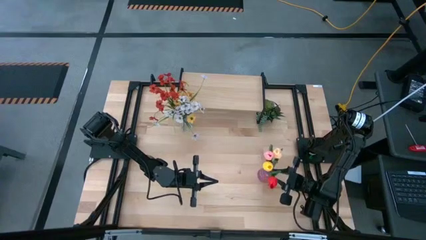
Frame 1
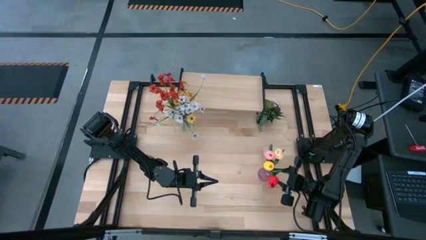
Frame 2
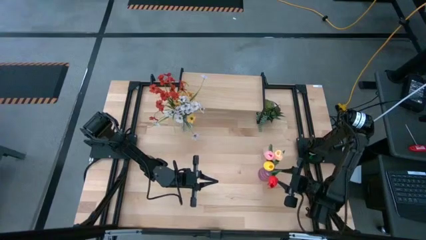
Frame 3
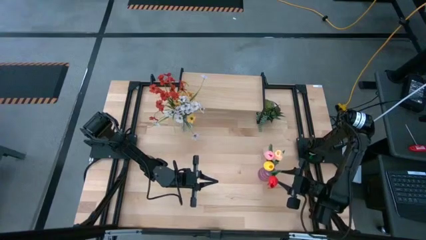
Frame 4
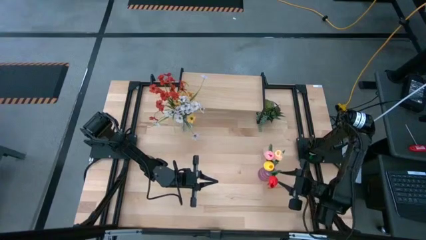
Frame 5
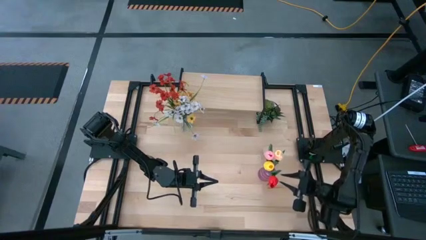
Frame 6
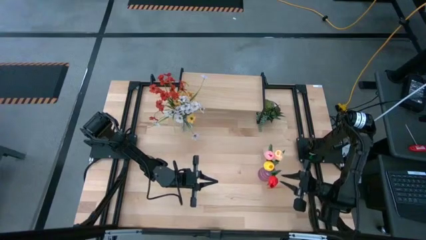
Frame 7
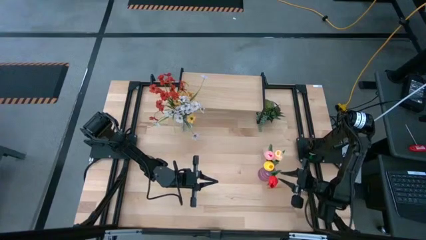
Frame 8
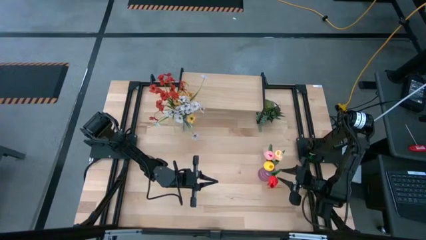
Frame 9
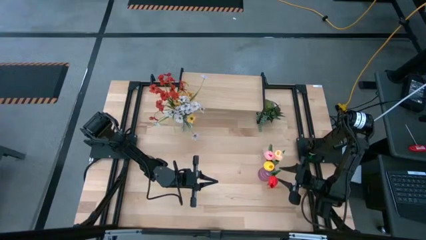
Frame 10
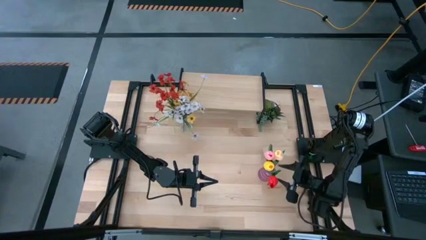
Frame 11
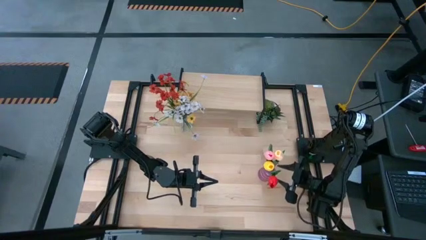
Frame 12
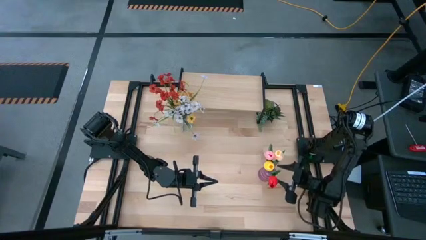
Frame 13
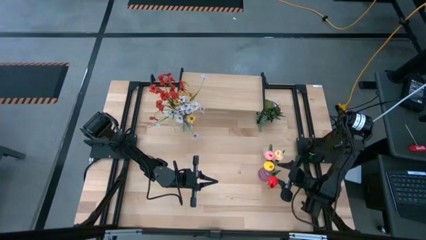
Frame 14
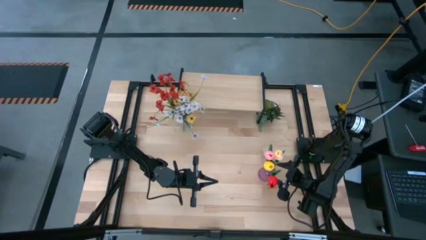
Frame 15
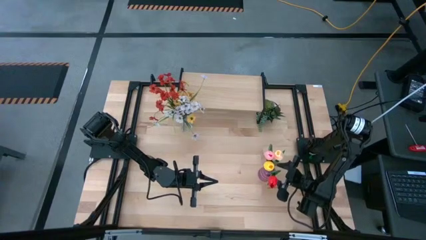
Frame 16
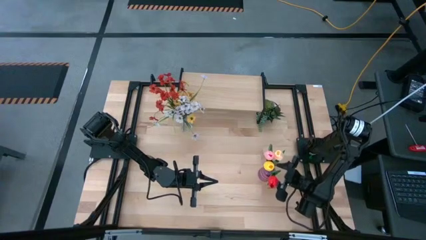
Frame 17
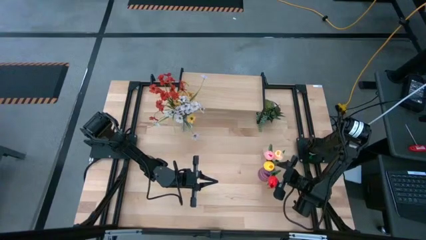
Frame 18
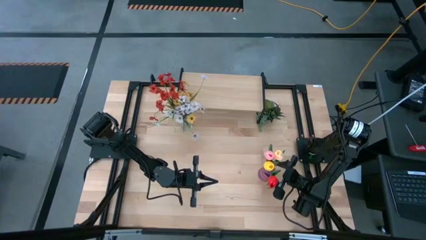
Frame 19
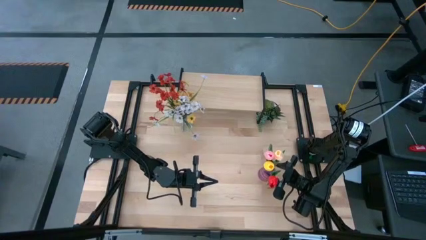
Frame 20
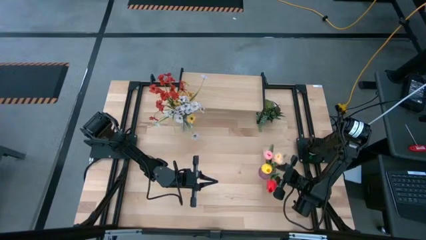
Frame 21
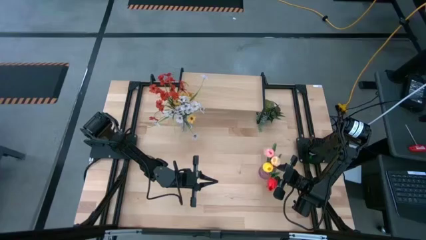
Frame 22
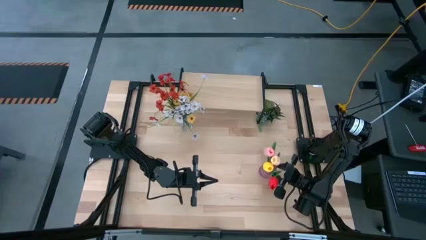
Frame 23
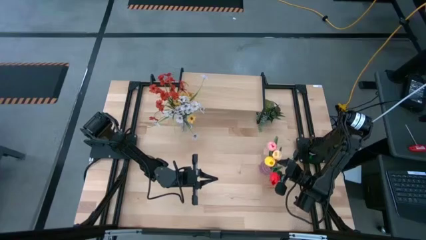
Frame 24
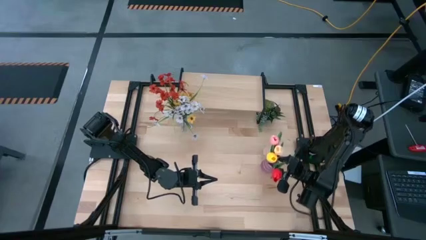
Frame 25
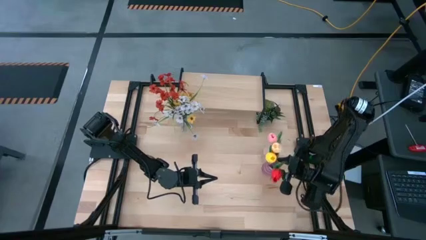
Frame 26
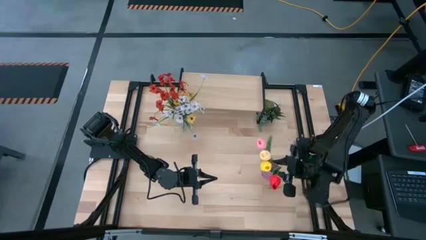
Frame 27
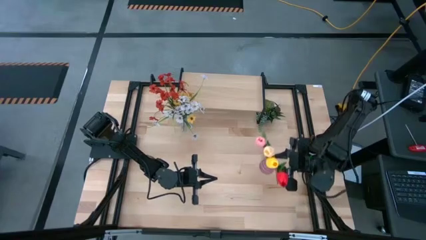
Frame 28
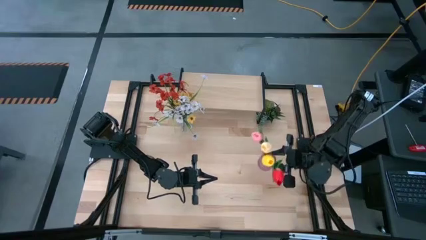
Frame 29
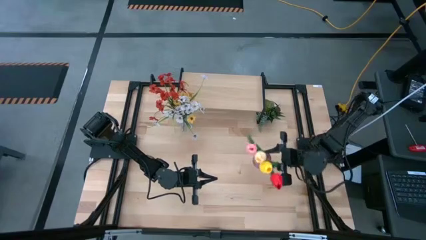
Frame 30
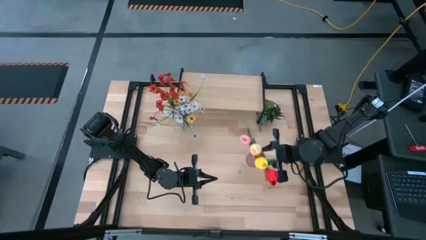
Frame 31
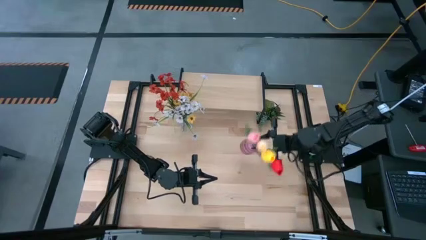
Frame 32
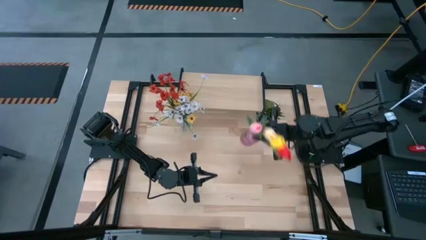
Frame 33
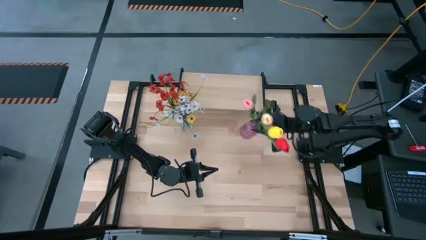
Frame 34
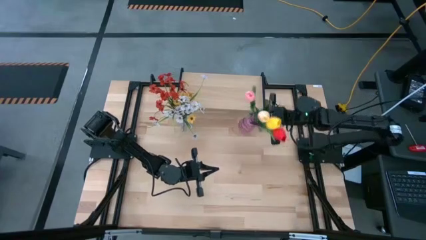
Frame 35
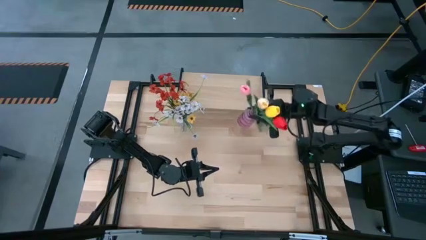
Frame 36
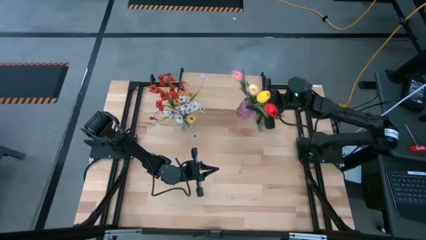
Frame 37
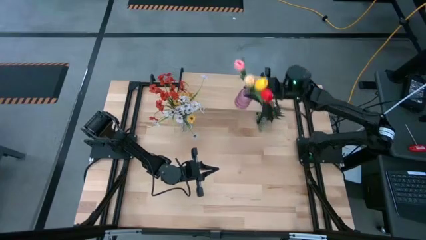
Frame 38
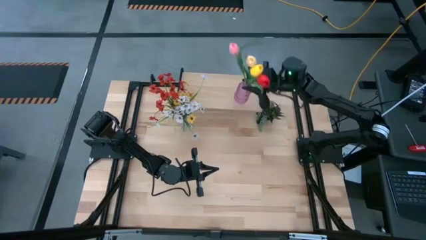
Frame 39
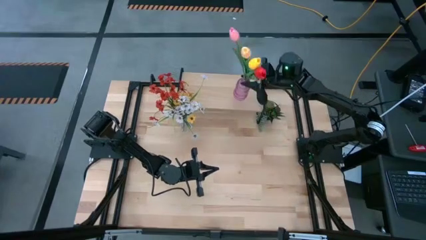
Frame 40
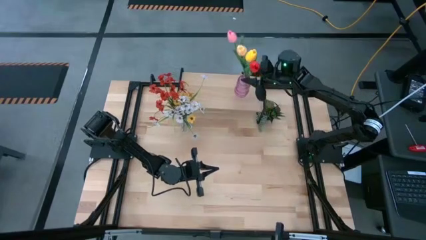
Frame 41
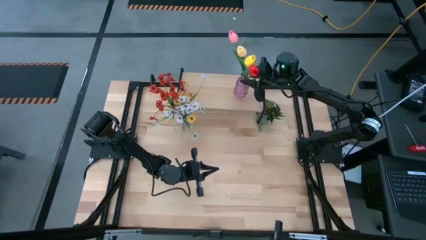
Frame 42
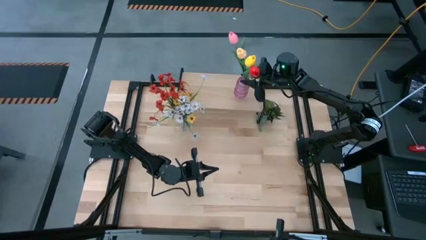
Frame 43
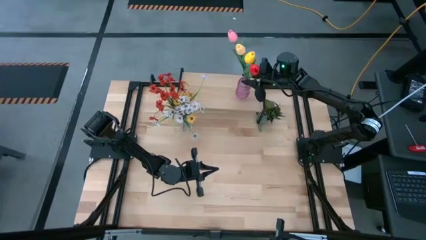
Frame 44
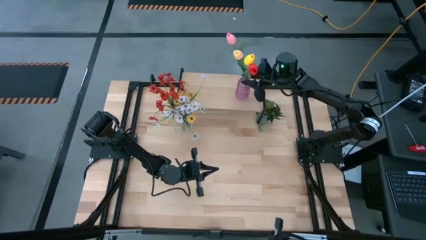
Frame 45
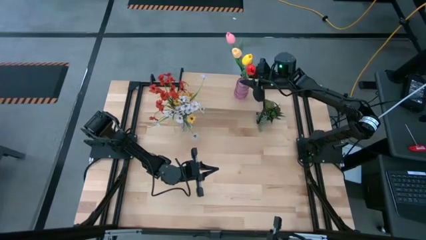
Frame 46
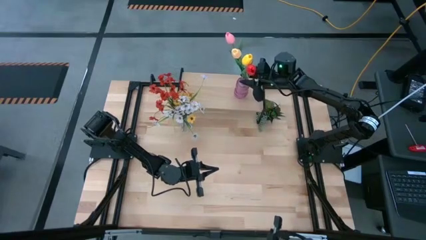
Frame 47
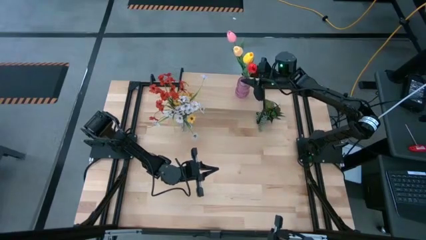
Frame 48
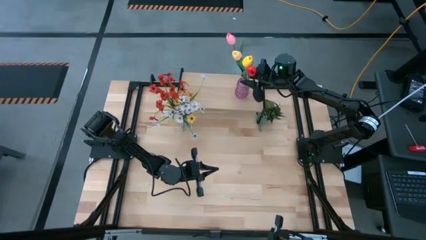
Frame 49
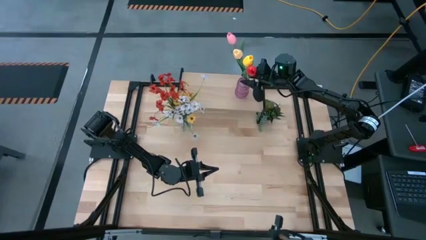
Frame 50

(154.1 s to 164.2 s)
Task: Pick and place flowers into a vace then onto a shelf
Put the purple vase with flowers on the shelf
